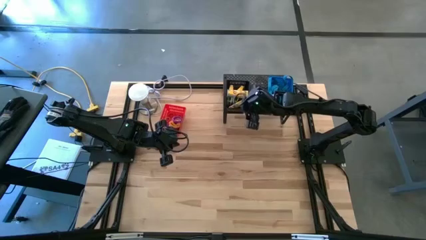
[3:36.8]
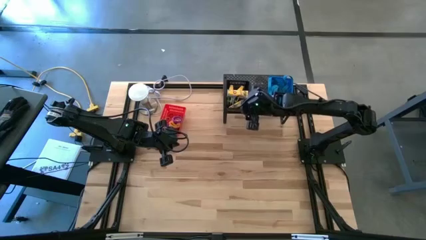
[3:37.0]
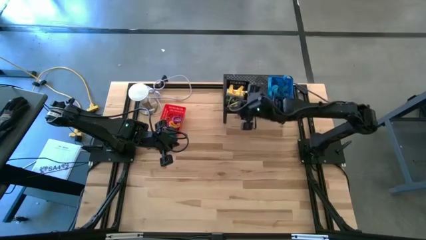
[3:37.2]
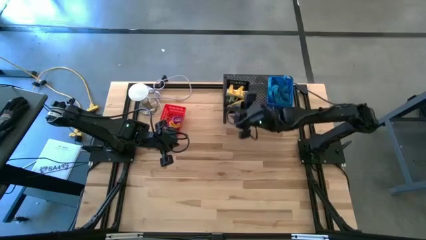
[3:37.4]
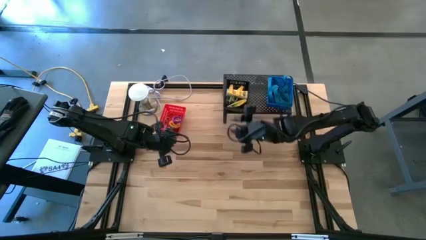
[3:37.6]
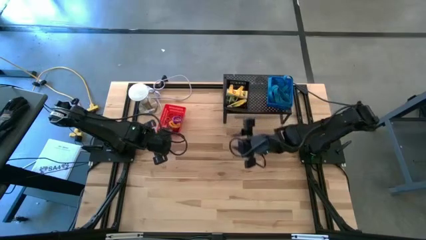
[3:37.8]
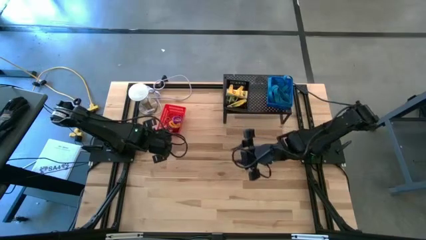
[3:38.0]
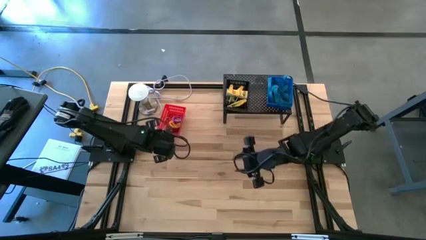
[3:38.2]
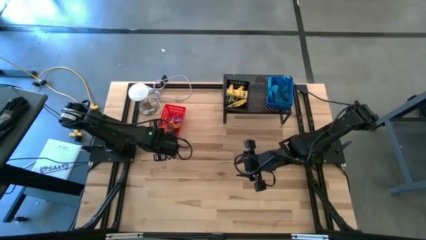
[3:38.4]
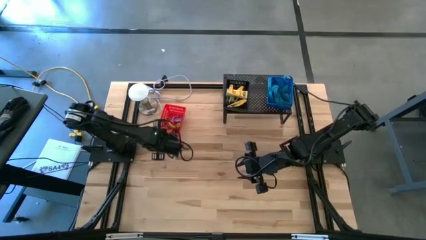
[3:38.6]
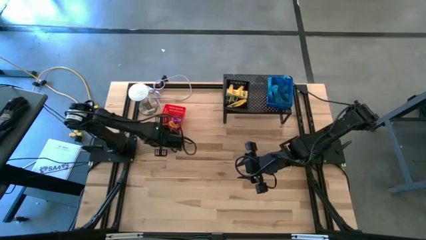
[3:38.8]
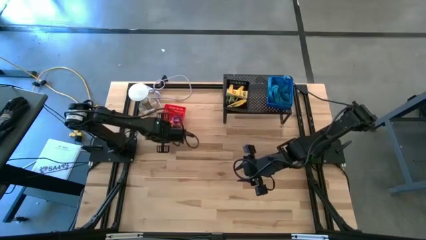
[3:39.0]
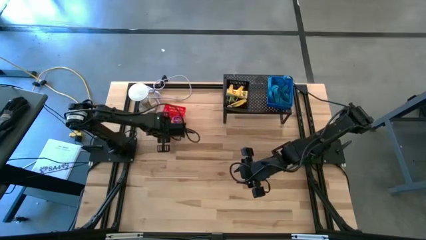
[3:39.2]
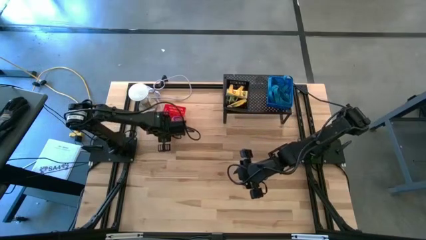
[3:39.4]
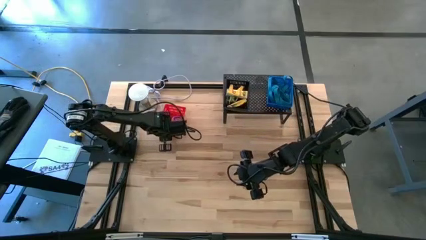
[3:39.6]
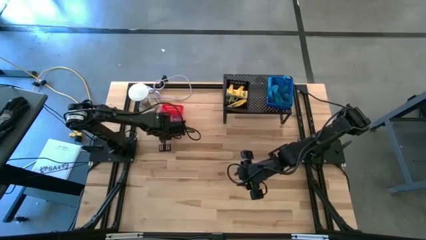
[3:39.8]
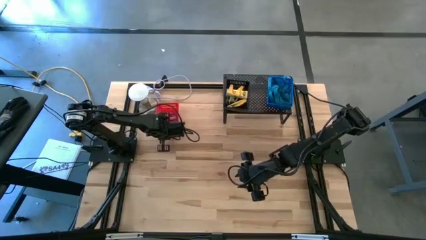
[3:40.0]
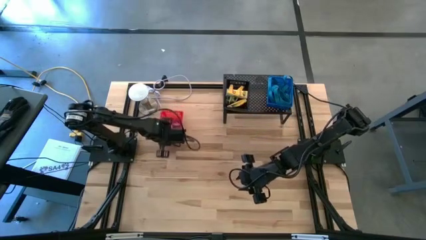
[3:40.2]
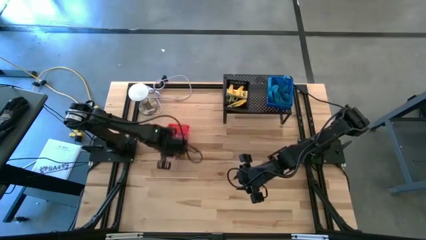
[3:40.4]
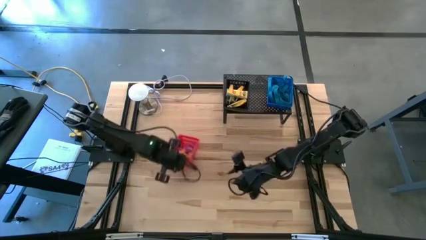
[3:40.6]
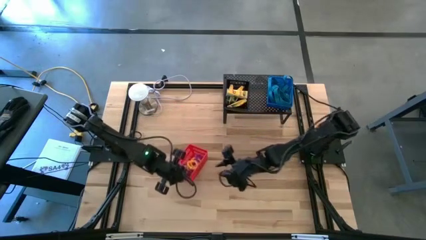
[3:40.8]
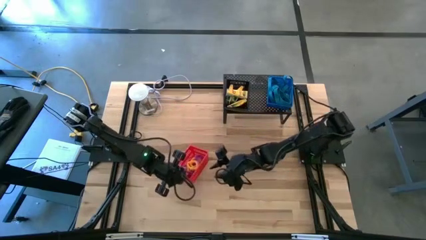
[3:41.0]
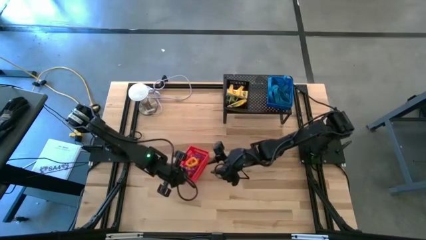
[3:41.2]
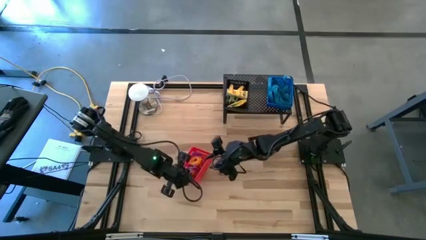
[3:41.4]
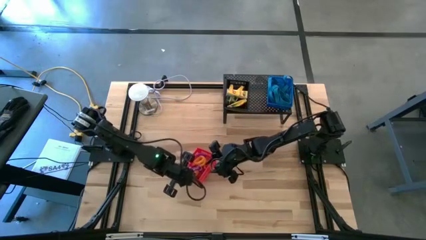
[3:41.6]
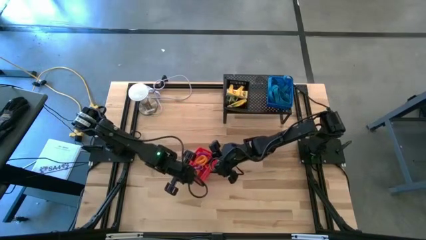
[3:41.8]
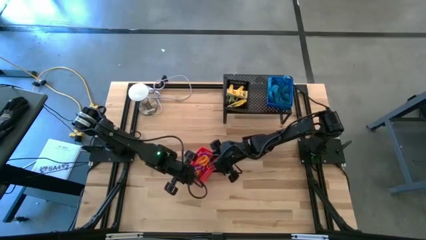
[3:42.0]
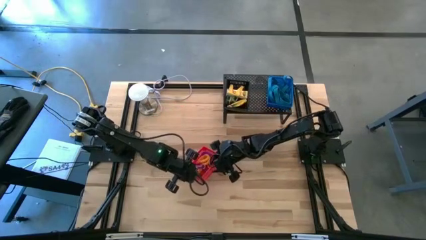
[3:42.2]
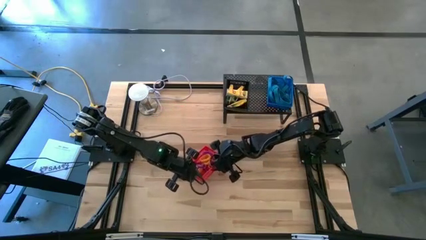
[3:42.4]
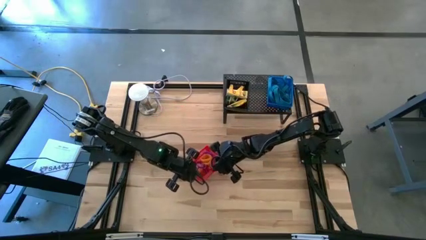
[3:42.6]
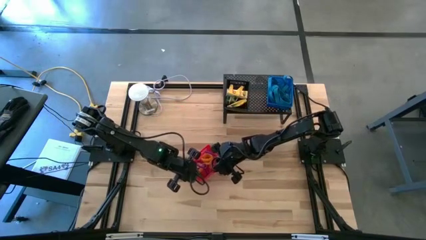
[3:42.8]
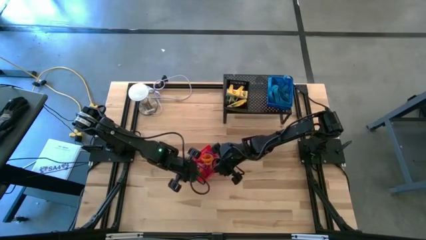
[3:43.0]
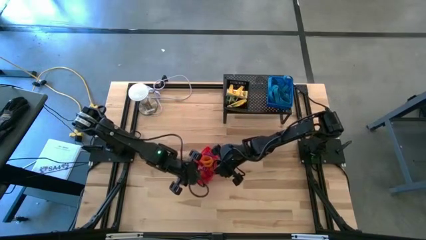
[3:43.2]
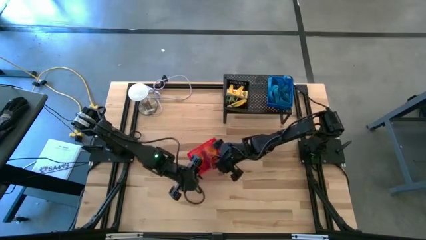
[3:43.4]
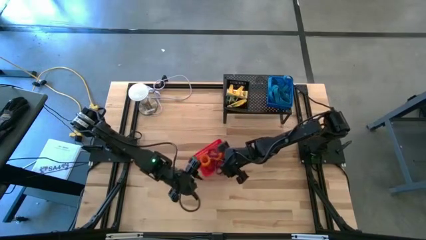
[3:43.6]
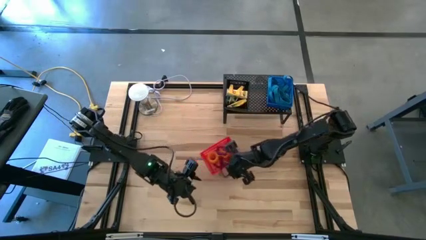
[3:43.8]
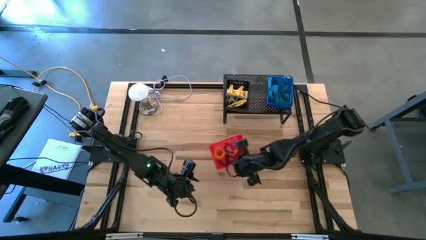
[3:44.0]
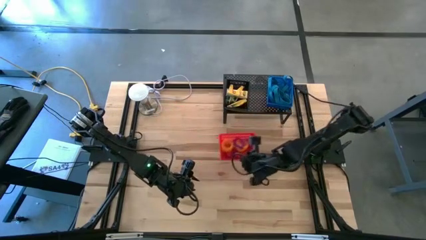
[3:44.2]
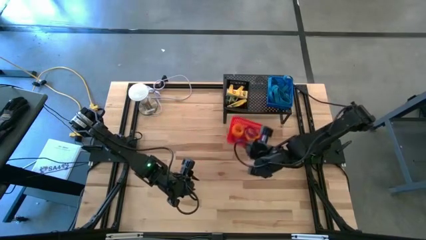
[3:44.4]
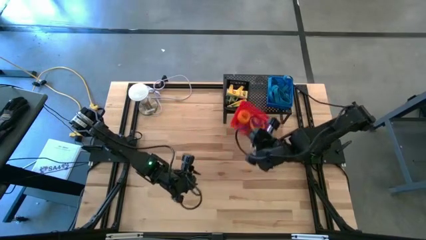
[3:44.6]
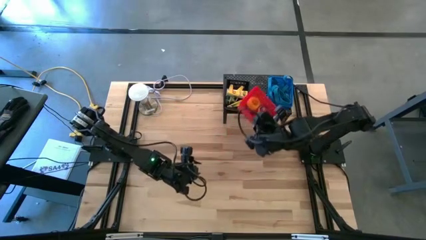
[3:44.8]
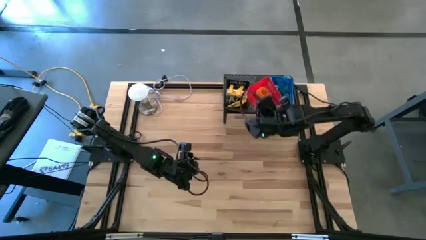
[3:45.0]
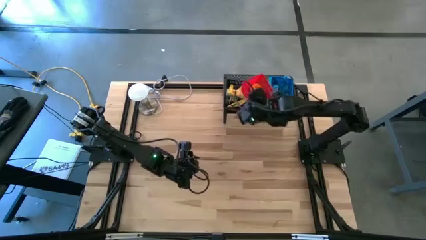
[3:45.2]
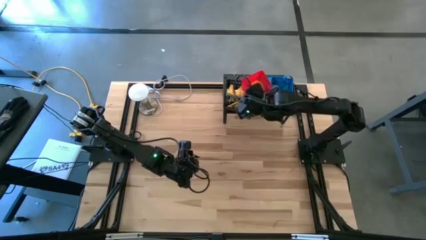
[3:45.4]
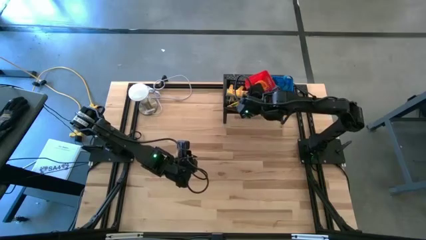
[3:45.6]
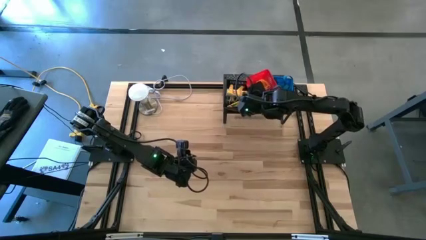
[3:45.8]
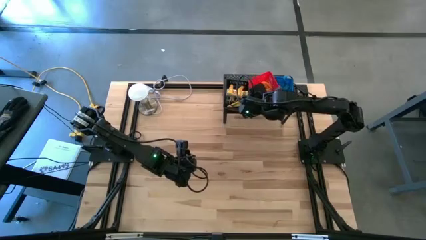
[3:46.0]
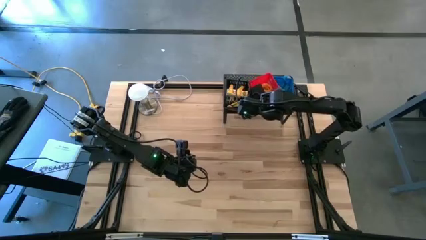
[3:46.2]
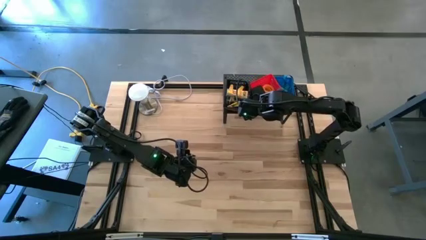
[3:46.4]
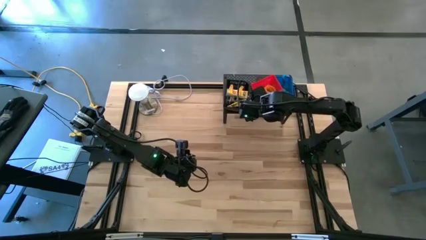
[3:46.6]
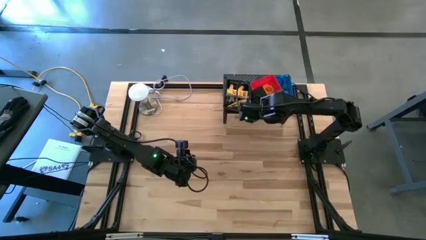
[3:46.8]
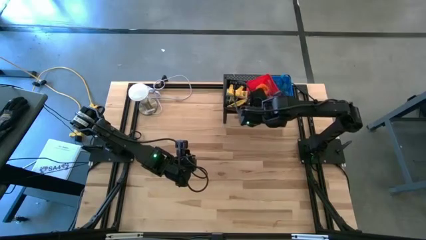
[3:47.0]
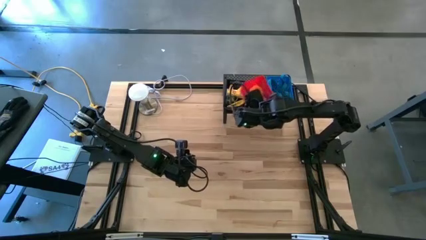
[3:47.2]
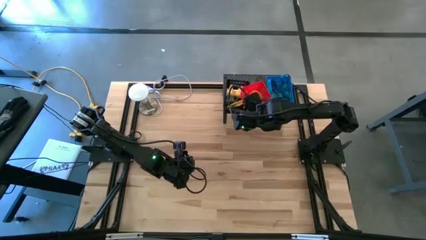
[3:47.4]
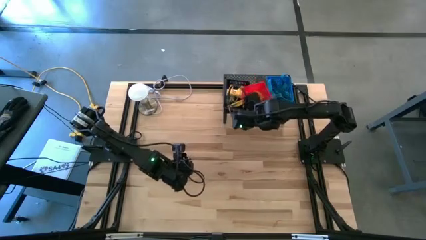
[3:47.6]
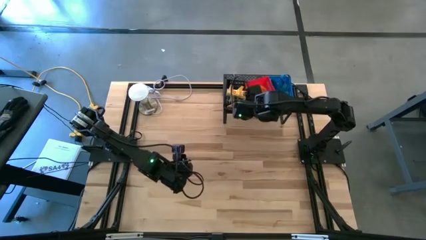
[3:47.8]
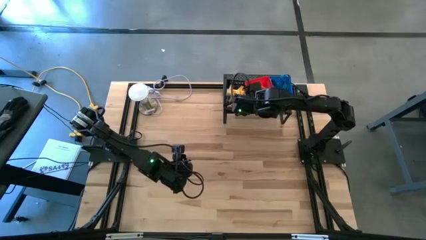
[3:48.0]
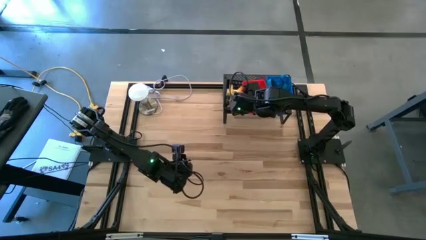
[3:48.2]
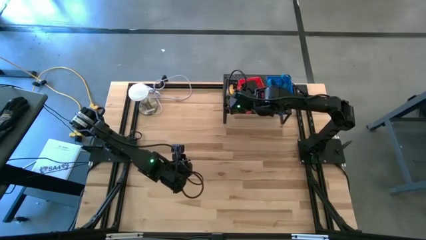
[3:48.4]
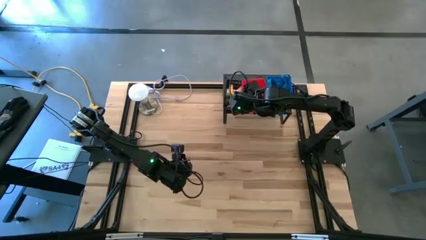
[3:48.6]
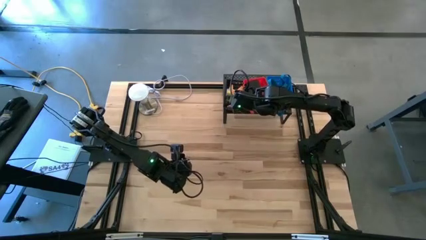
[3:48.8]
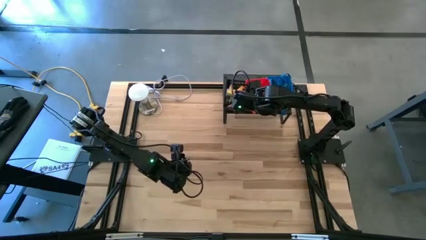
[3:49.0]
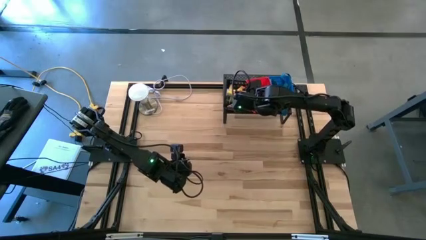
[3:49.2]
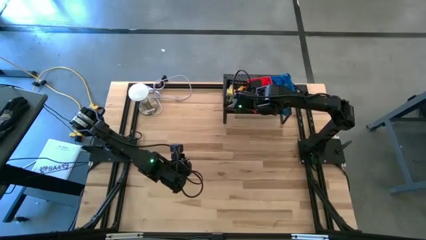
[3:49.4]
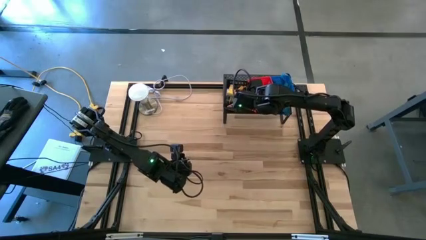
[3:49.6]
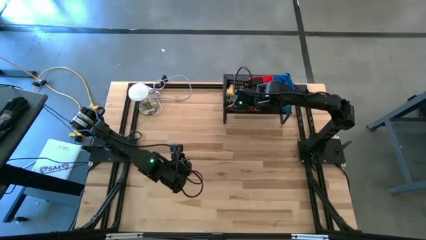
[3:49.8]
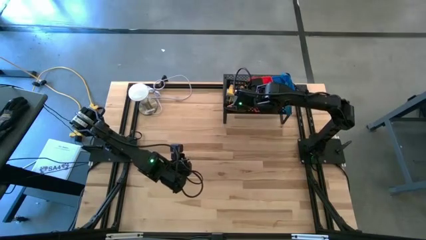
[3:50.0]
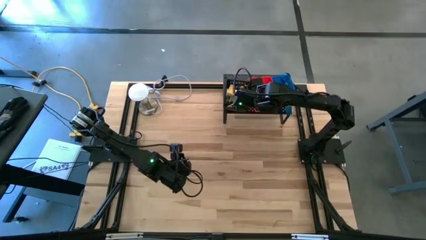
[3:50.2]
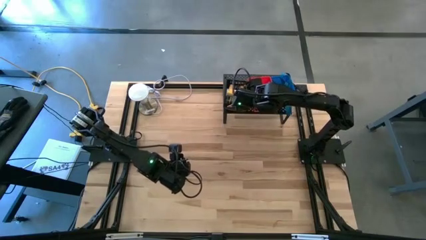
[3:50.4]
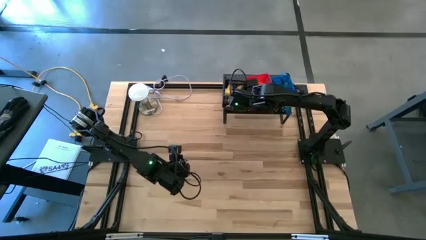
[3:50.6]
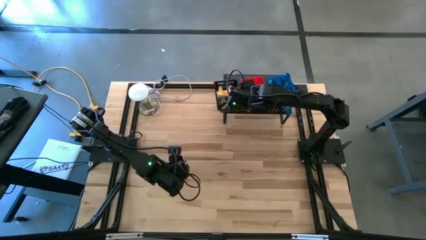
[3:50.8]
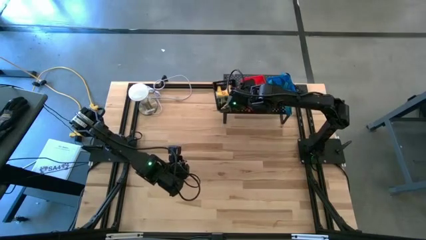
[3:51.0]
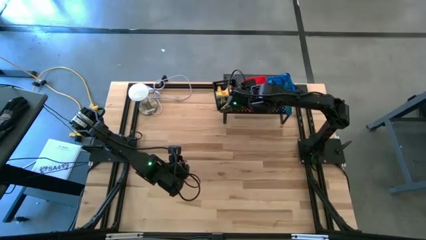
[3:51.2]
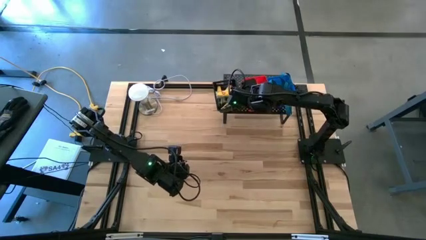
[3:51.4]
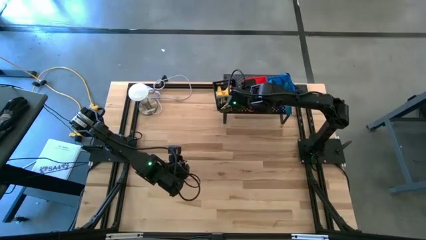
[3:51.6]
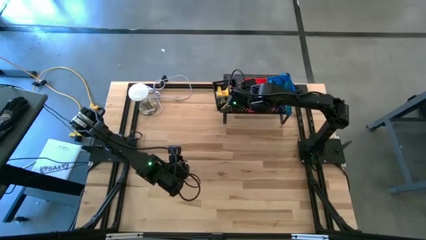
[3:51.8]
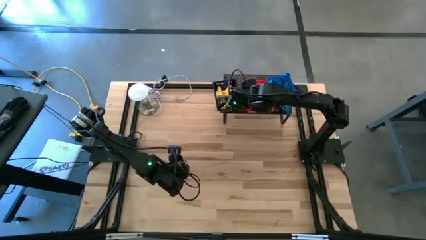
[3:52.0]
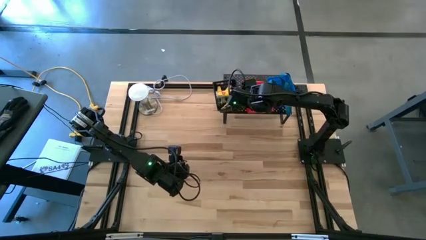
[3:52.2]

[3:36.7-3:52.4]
Task: Pick & Place Office Desk Supplies
Put the orange bin on the shelf
